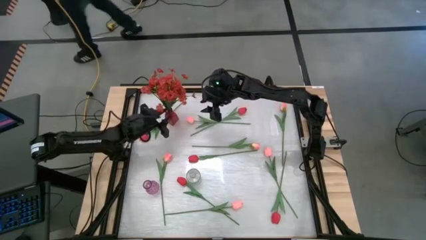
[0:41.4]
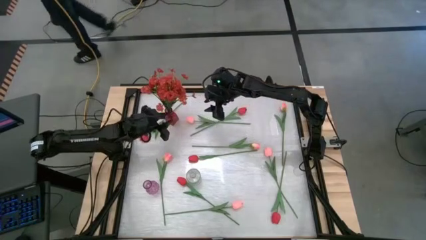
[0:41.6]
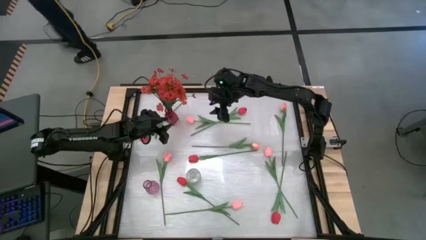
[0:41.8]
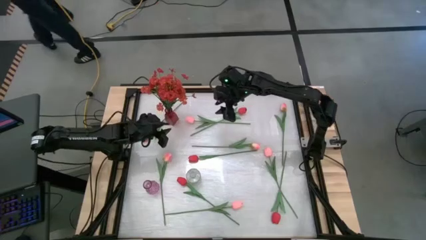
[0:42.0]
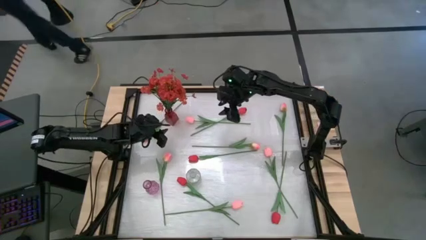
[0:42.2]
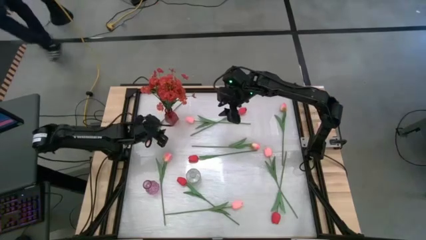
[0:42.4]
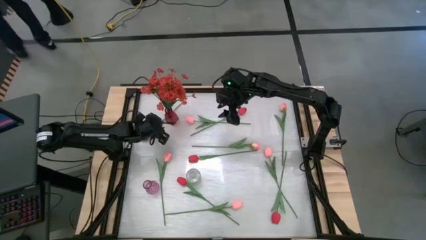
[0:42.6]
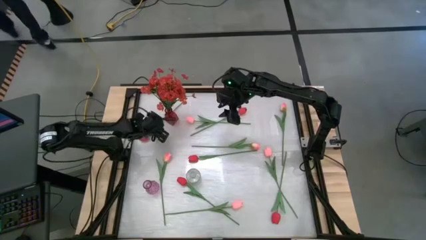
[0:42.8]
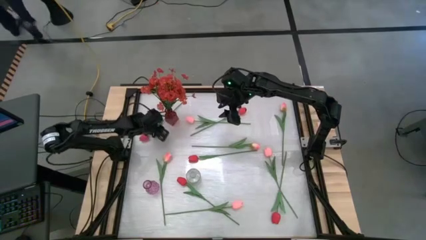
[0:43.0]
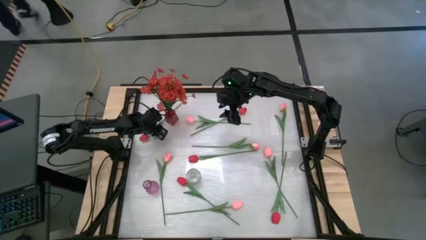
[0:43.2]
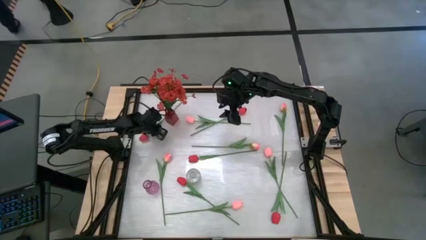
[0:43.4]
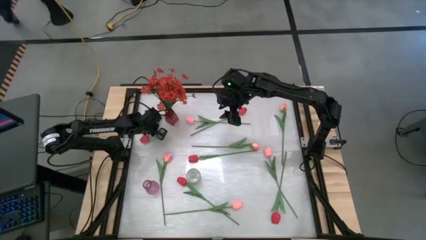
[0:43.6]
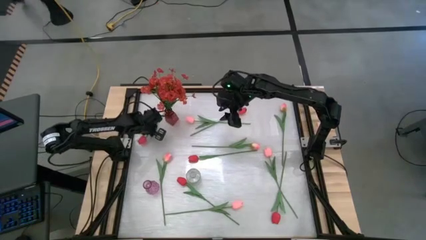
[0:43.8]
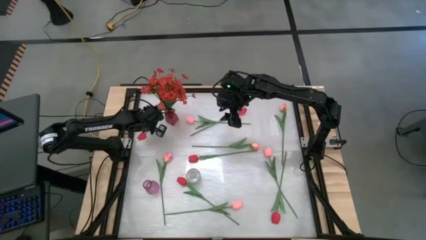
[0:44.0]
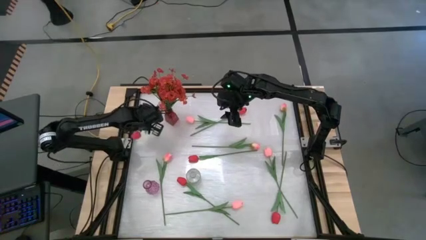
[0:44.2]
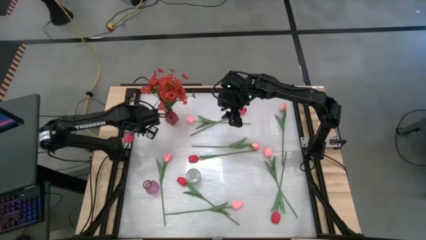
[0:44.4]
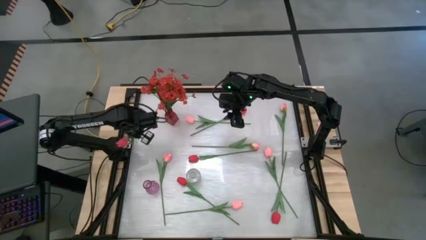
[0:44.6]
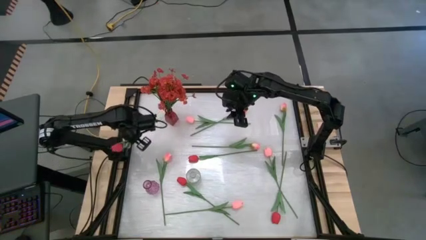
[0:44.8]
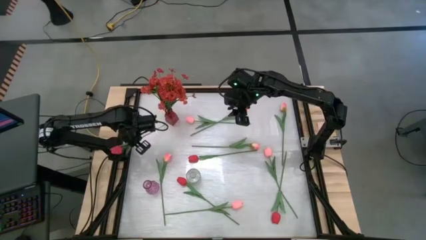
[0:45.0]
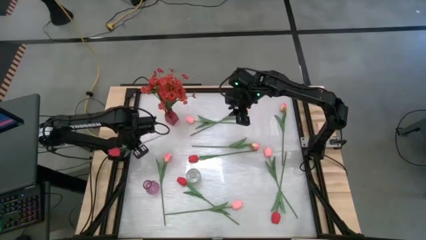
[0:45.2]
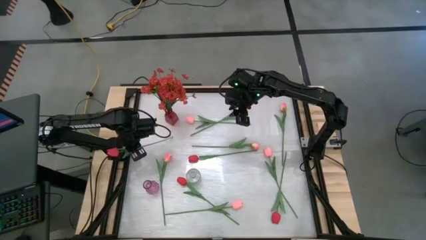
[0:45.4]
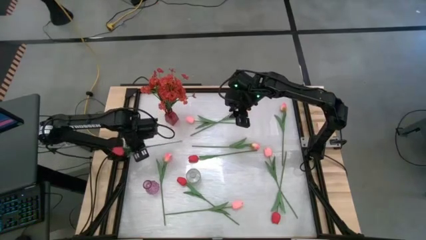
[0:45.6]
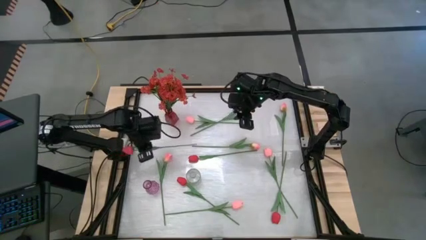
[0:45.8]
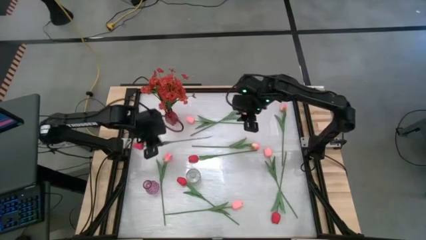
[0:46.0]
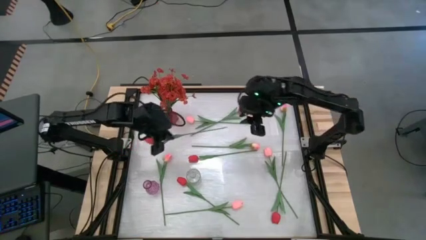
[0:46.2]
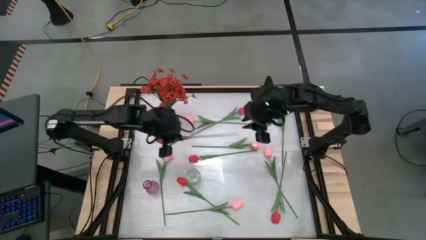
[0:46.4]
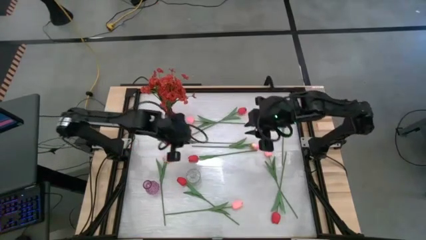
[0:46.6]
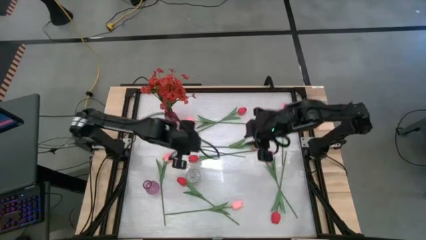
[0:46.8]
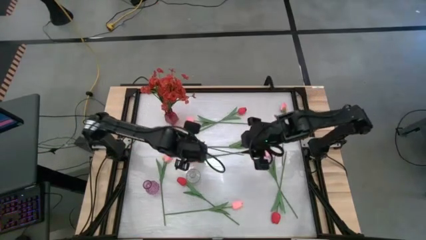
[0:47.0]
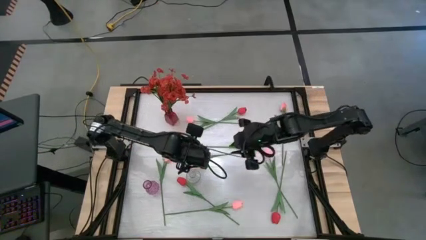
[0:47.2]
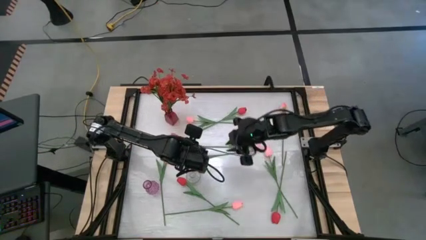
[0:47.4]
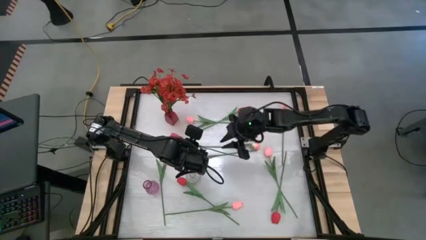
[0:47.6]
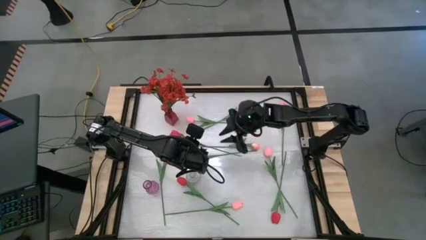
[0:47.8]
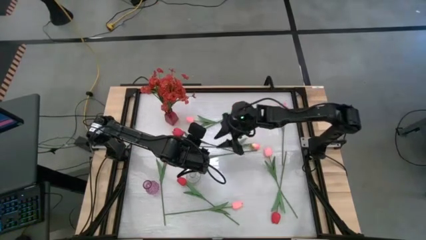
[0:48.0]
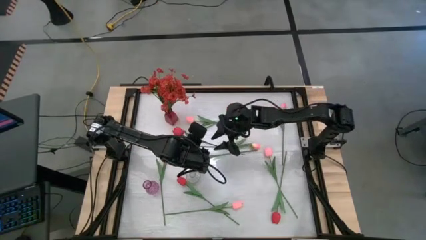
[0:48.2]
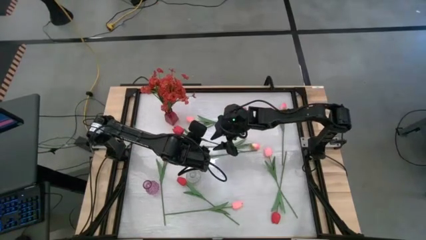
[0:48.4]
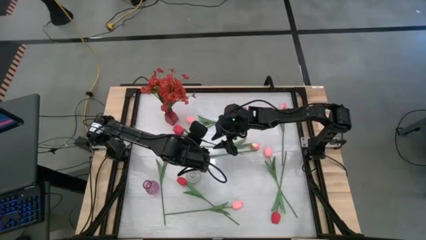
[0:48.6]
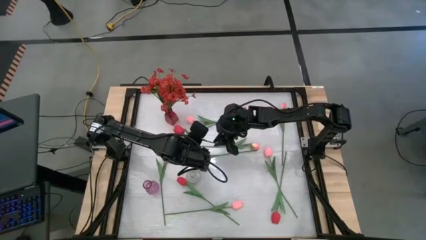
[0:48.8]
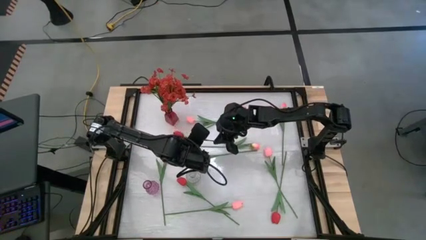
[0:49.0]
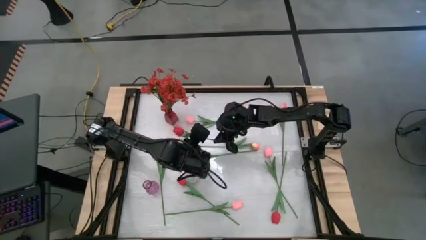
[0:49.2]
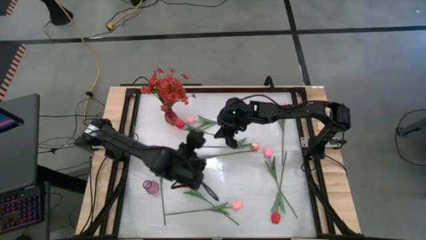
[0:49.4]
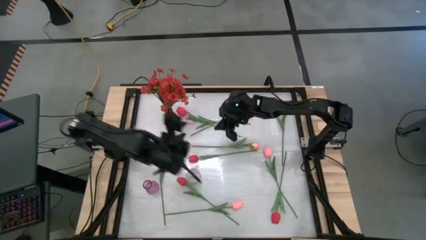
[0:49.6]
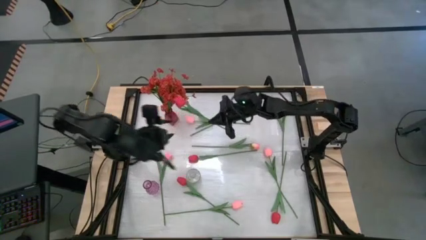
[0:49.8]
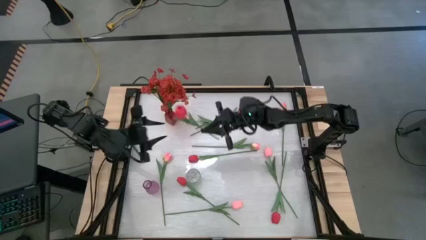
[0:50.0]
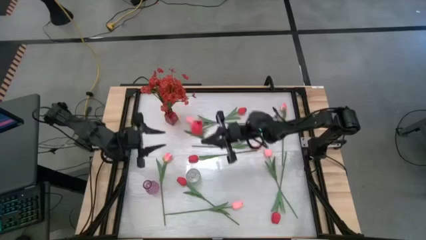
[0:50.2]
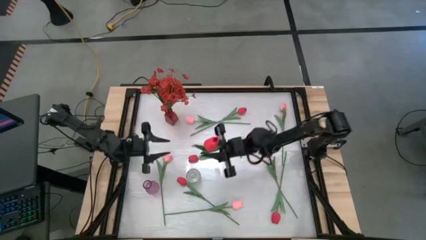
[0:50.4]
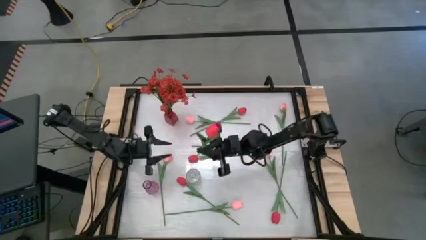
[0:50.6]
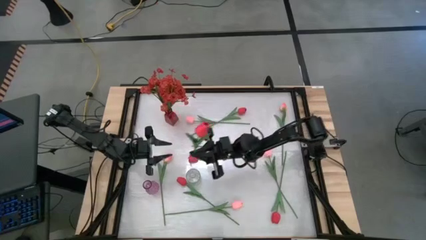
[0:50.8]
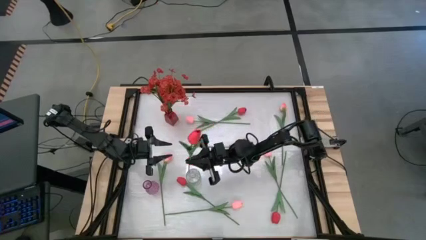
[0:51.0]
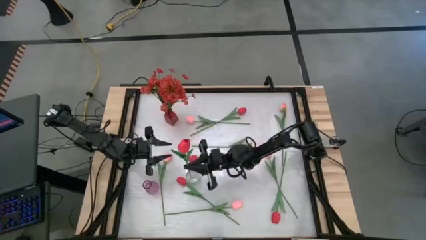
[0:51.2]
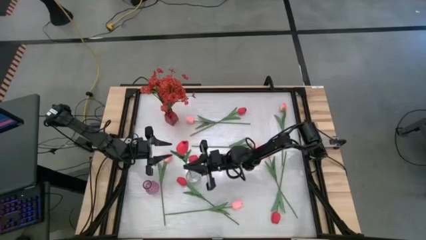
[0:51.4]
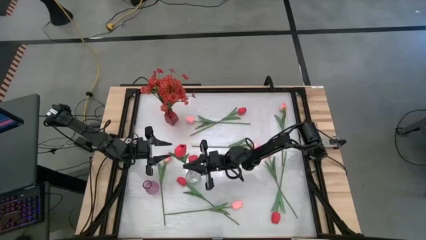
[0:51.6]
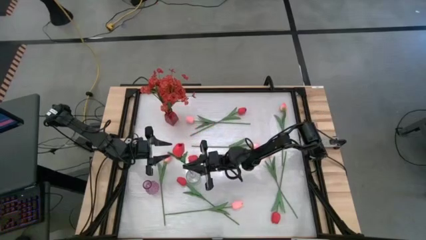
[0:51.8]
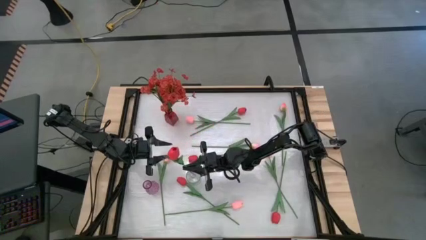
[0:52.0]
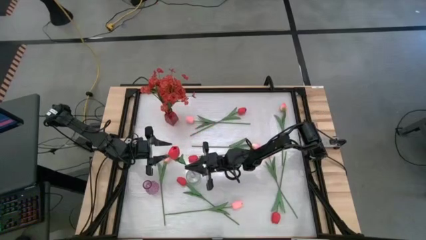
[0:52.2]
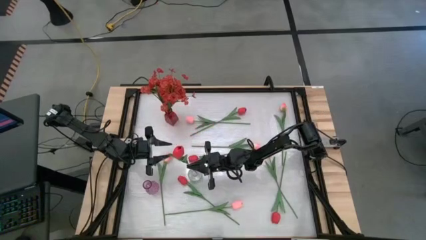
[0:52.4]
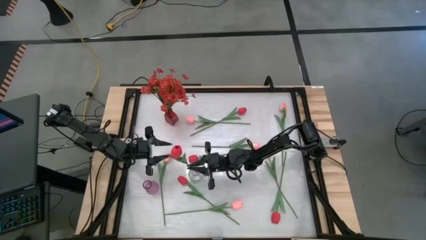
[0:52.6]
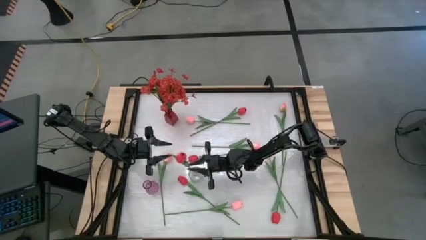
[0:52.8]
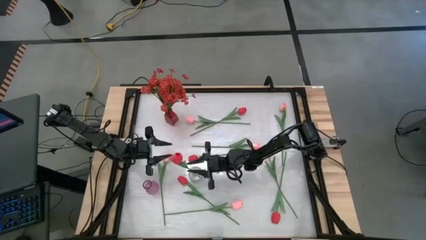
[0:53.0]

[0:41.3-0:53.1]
Task: Sort flowers into vase by color
Put the red flower into the transparent vase

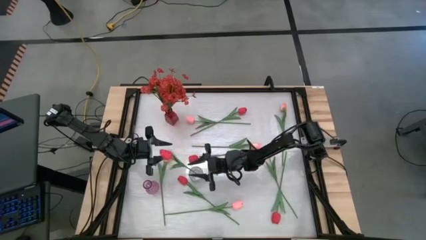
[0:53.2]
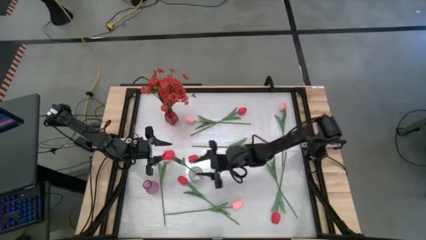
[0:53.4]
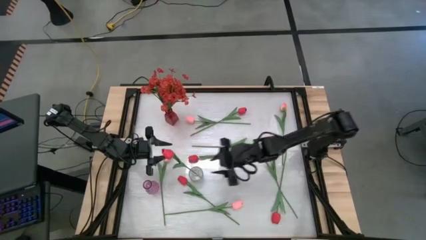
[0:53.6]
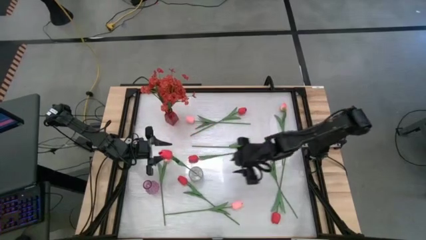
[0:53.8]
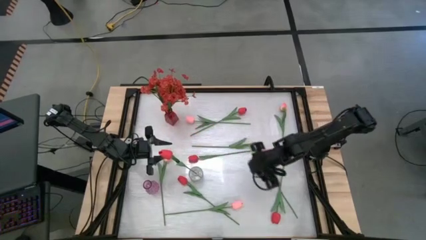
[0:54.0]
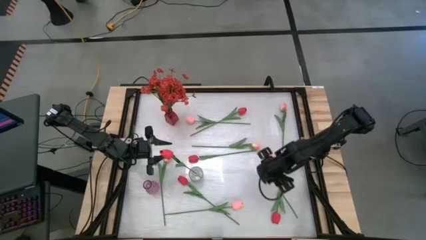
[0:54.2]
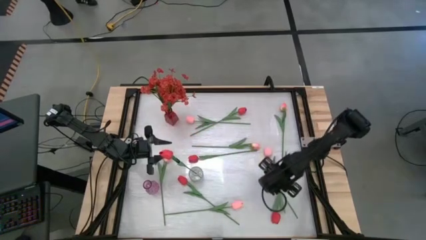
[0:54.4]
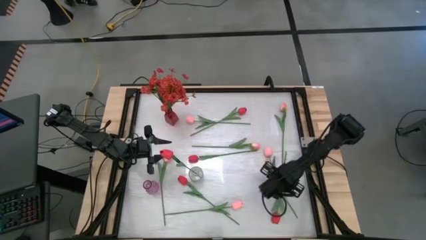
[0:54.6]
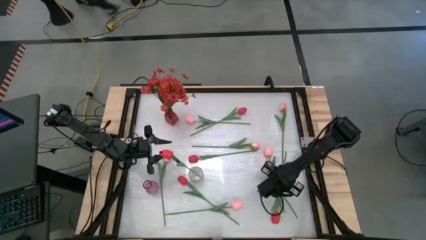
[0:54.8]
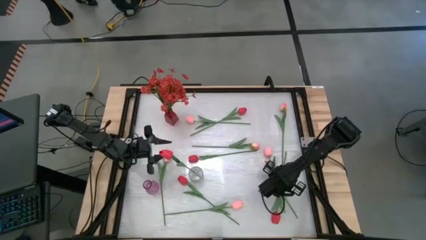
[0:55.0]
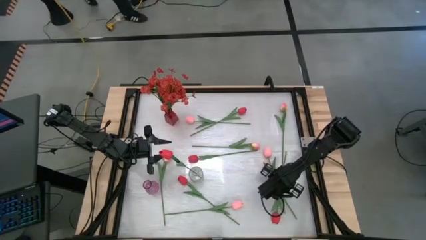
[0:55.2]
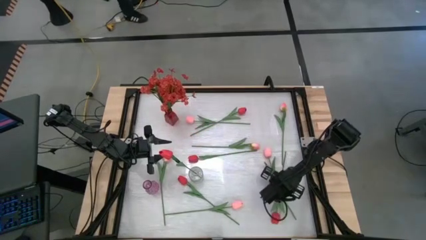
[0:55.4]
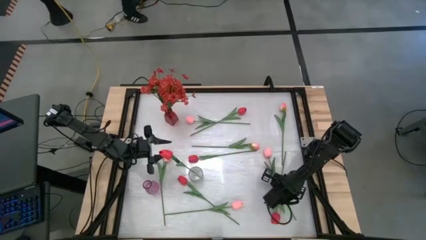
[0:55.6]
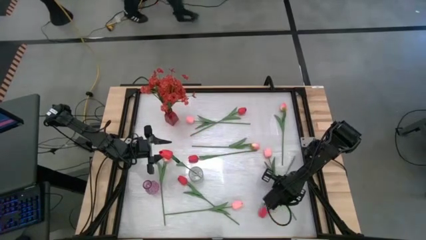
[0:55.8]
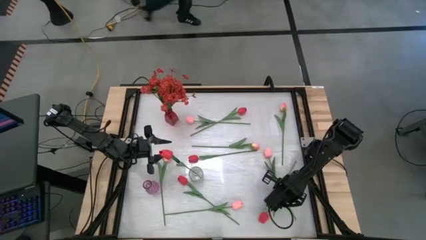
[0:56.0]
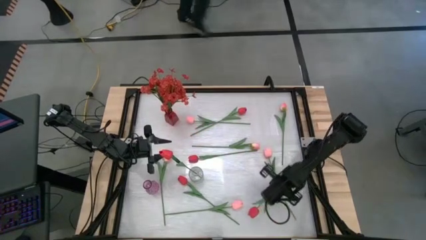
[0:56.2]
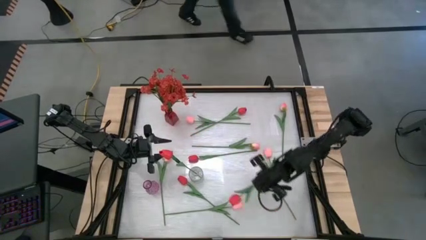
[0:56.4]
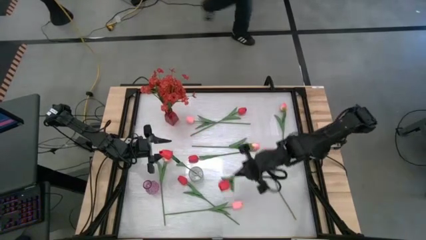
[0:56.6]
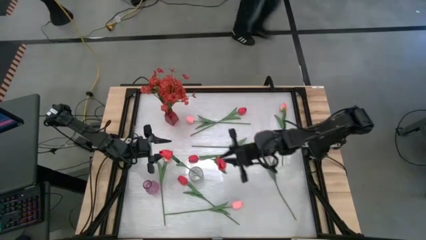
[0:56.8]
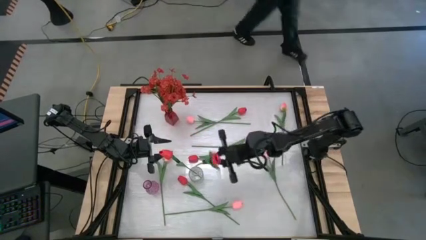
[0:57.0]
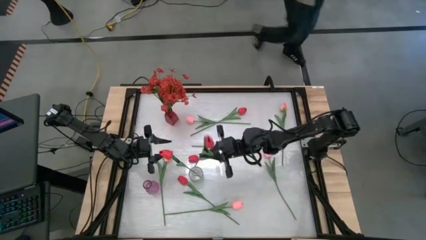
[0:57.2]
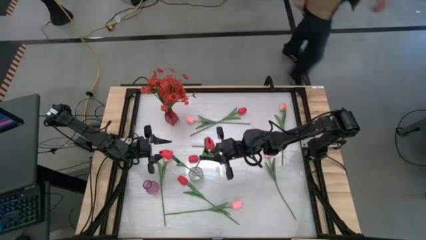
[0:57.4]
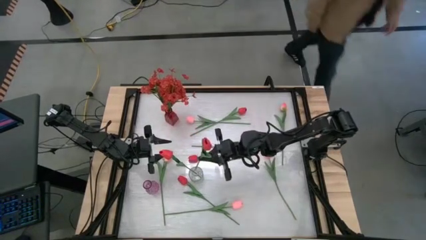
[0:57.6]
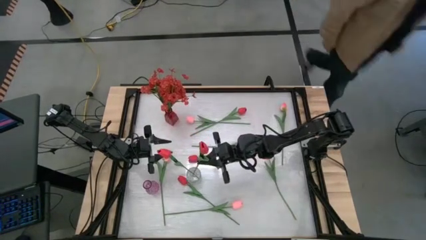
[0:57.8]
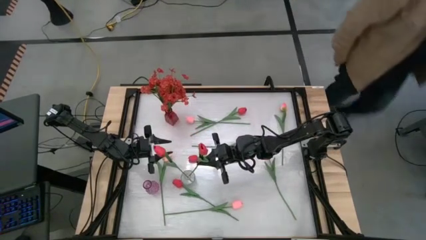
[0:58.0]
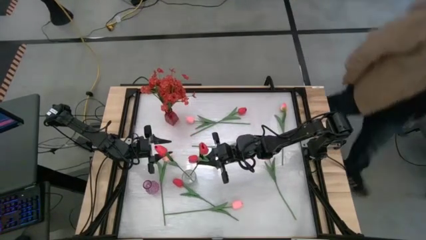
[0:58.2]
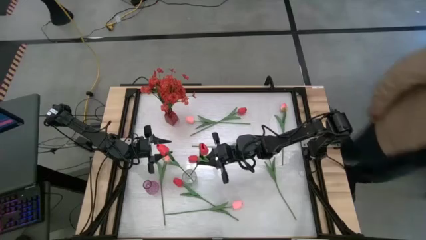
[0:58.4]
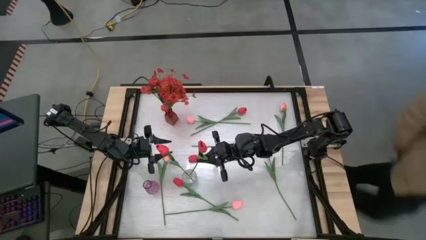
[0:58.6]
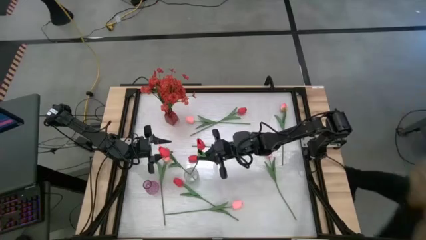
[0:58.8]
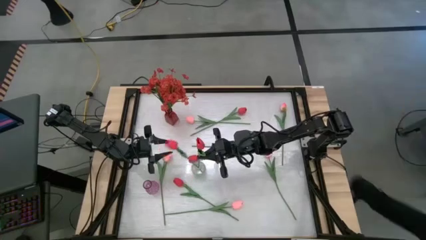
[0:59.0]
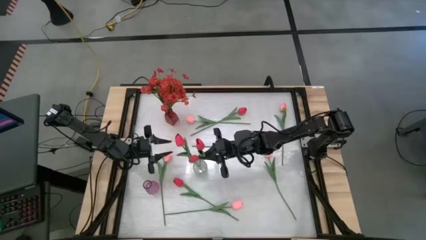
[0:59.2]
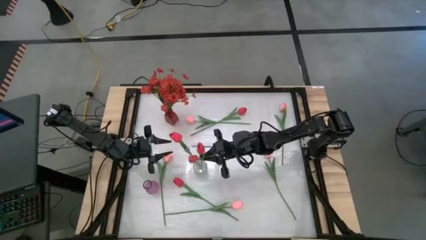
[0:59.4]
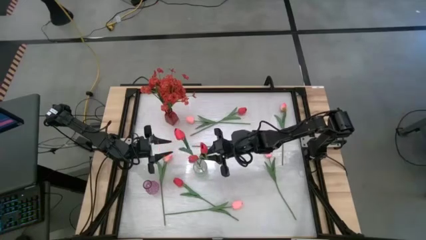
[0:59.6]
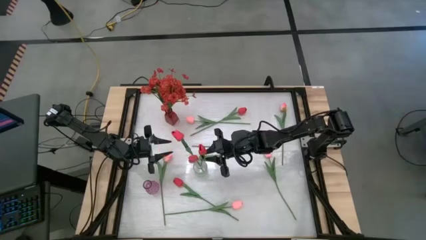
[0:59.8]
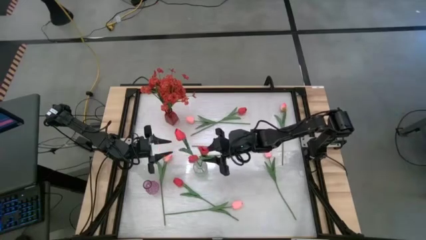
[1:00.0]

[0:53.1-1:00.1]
Put the red flower into the transparent vase
